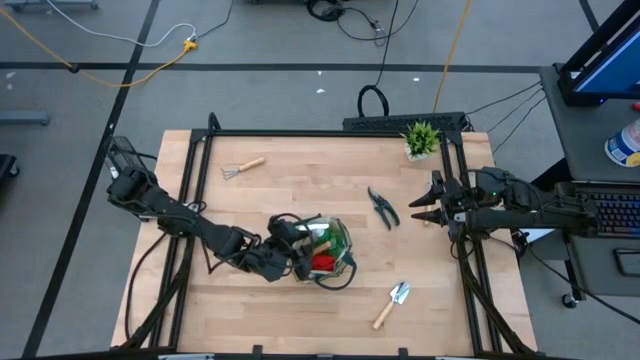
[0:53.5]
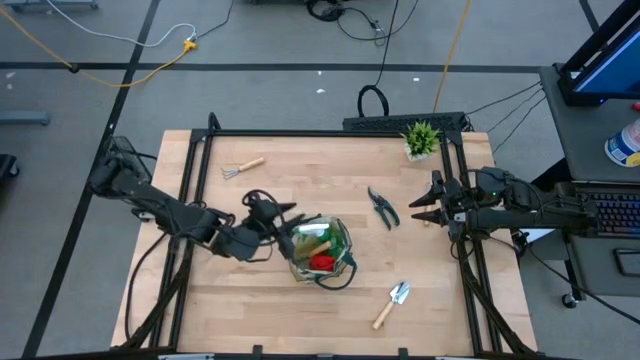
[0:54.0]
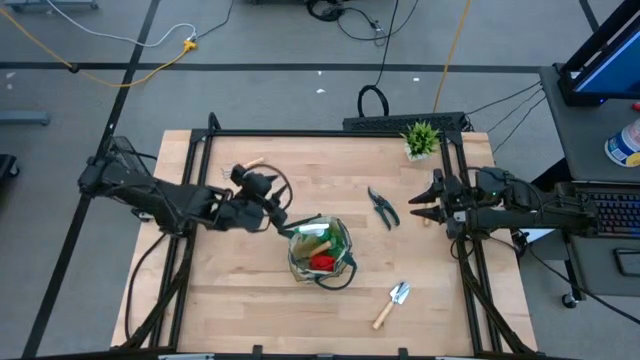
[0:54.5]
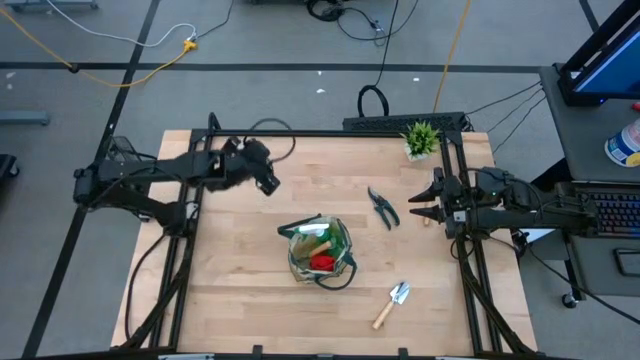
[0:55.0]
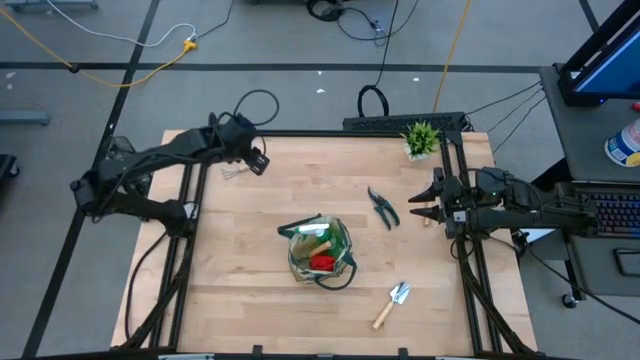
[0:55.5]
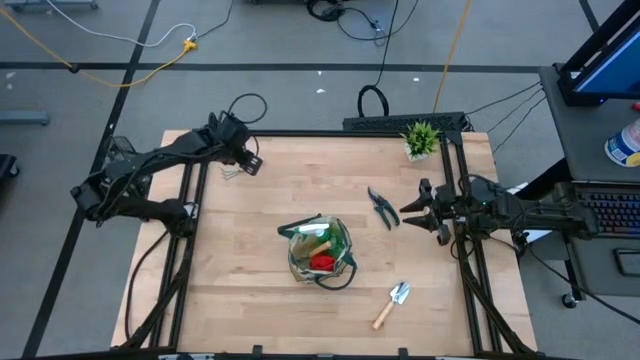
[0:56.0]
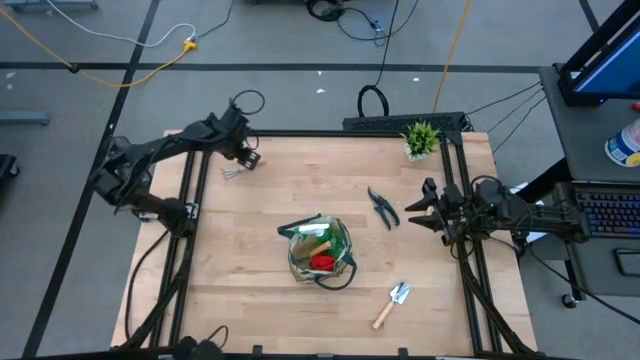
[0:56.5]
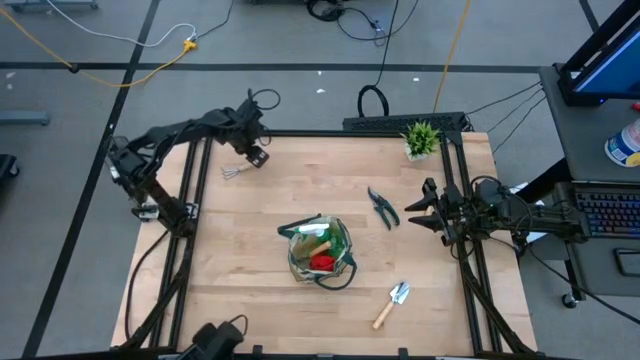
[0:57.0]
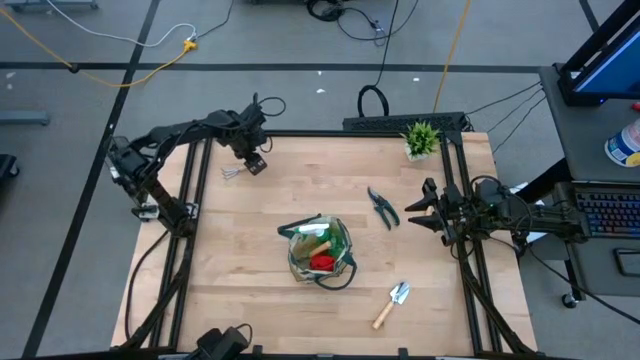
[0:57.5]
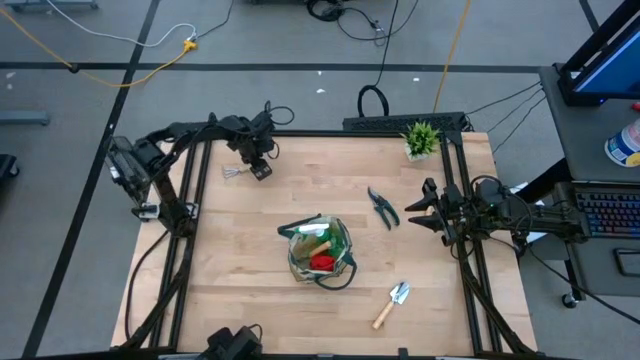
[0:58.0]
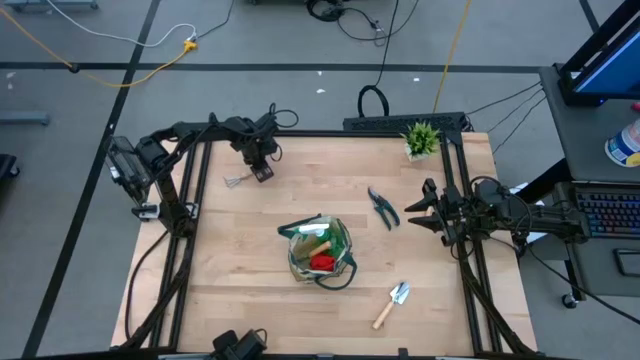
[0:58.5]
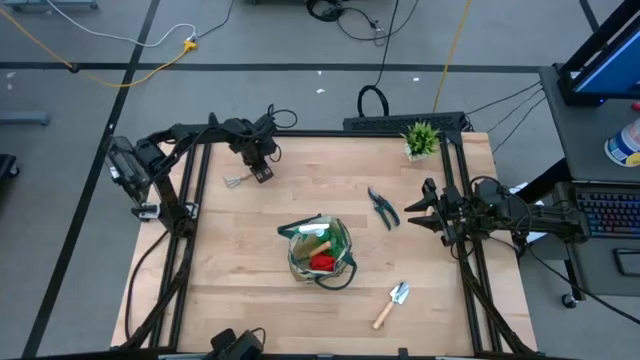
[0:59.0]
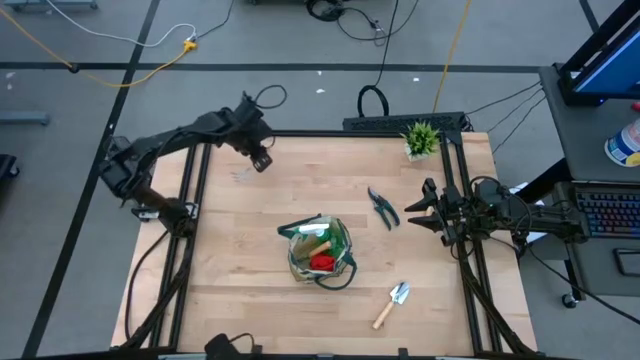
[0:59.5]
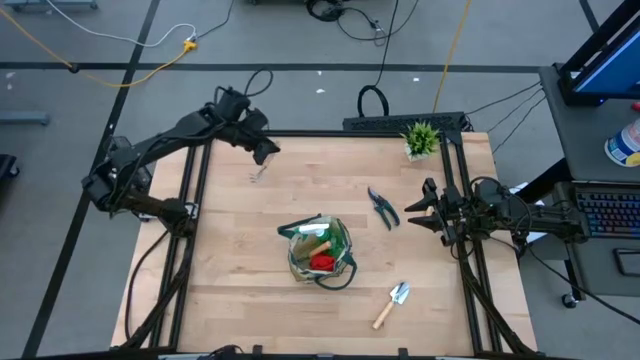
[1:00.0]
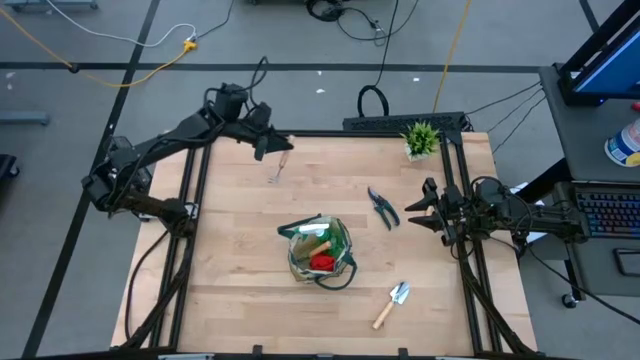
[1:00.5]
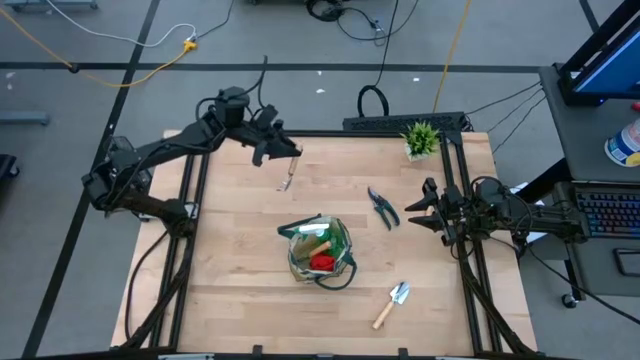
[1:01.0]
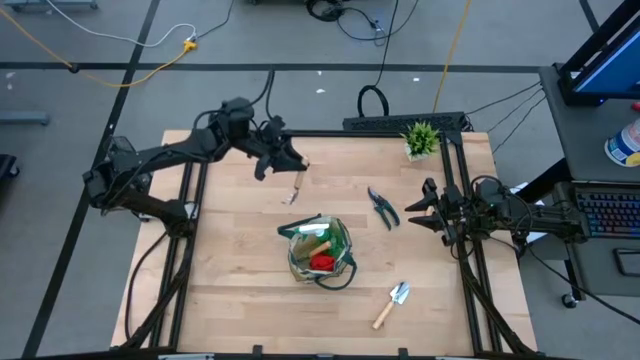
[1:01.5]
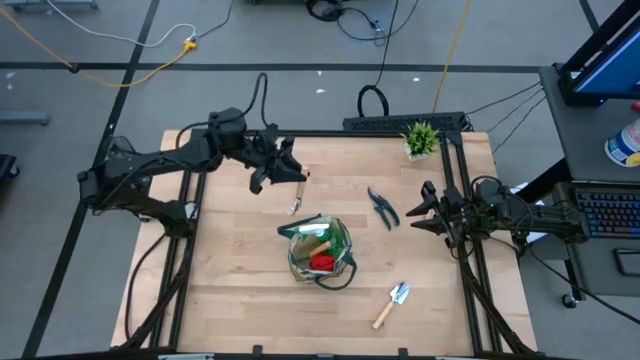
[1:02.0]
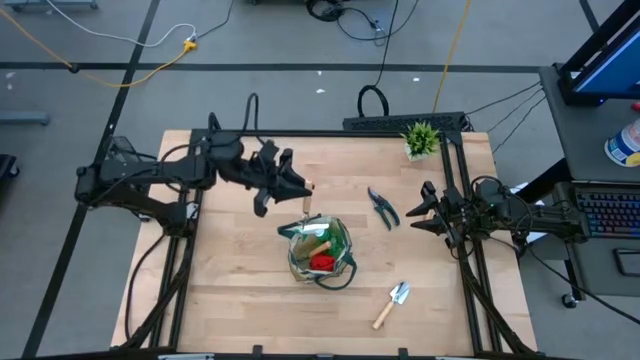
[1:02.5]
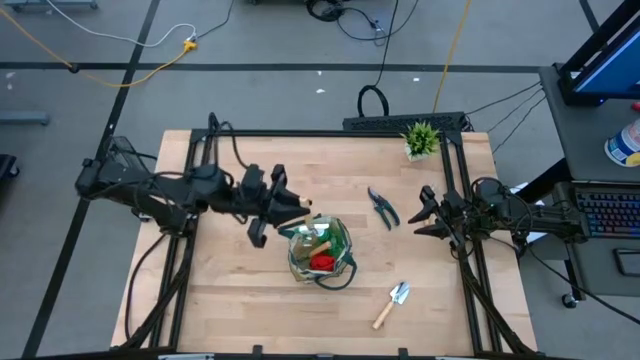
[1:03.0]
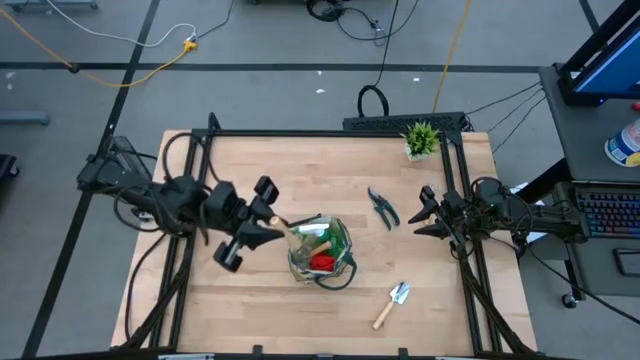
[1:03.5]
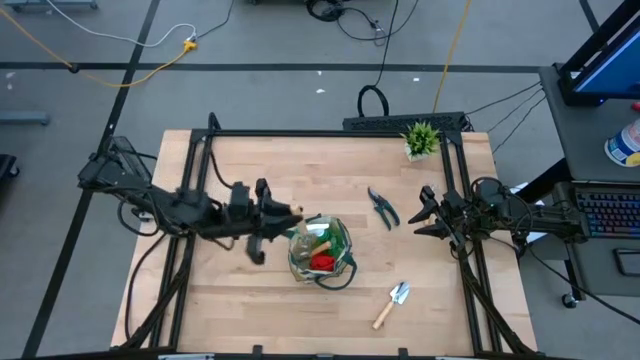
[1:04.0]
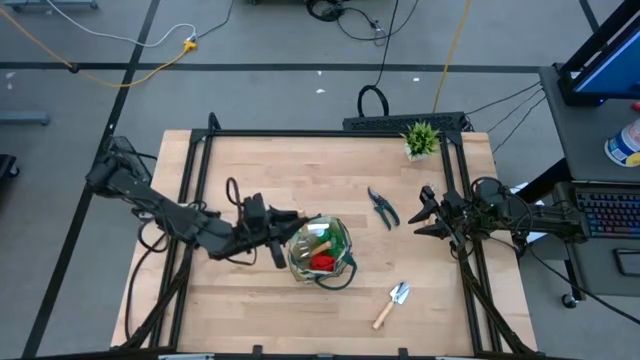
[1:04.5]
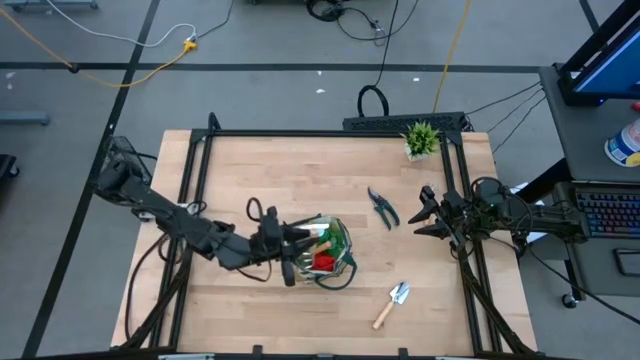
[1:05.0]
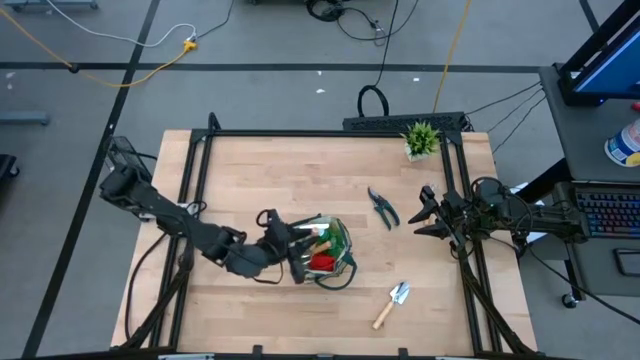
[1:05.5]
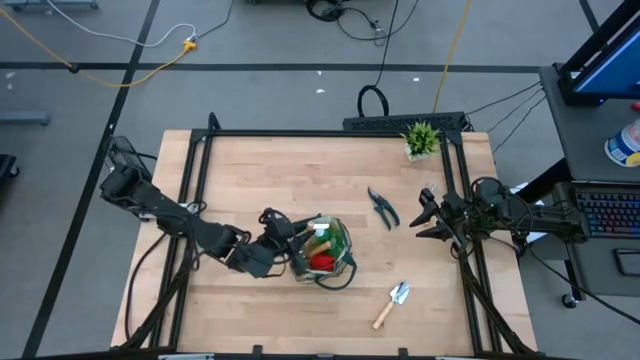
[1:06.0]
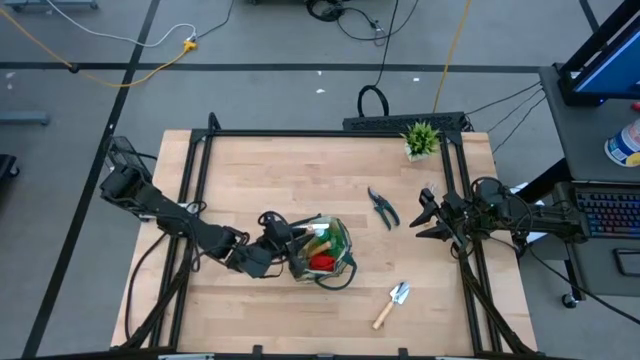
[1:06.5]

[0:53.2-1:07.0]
Task: Pick & Place Garden tools in Gardening bag
Put the left brown hand rake into the gardening bag

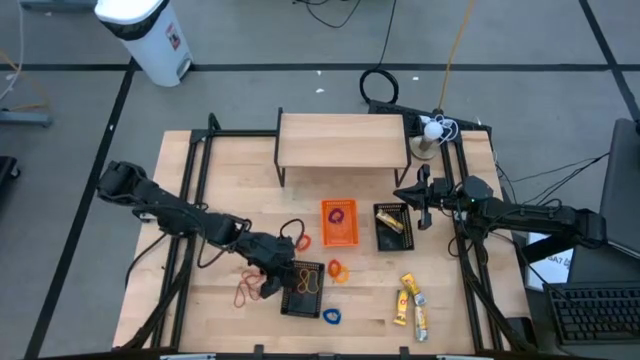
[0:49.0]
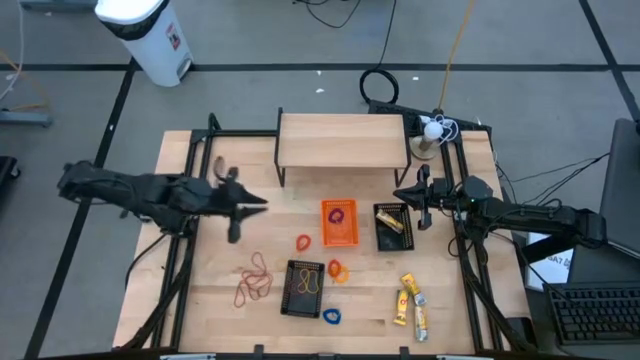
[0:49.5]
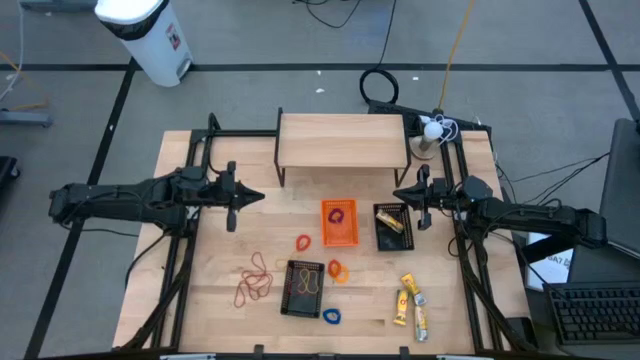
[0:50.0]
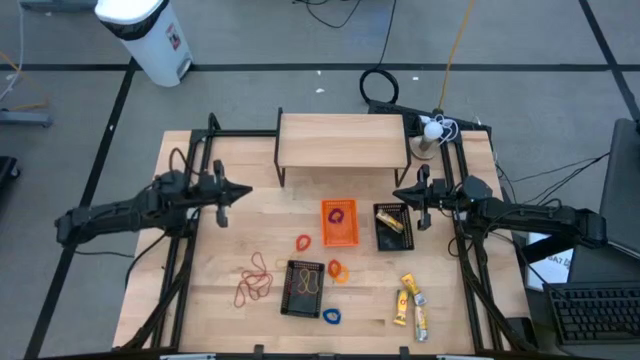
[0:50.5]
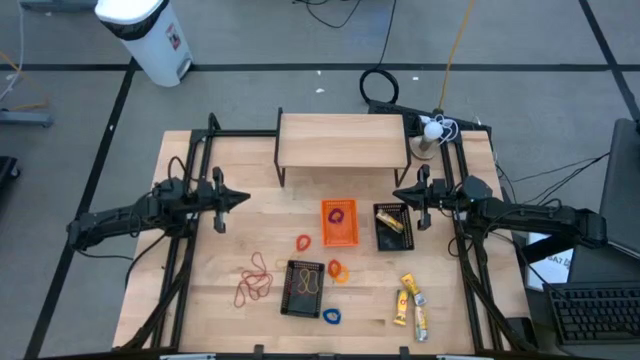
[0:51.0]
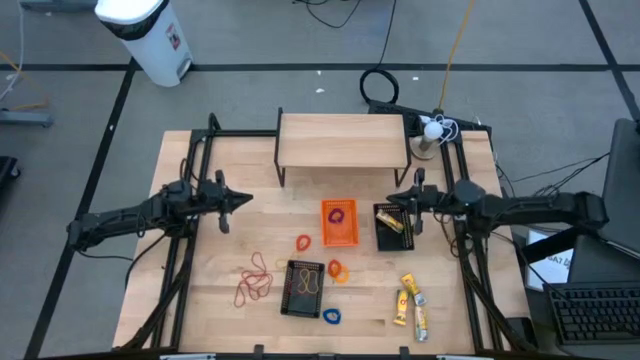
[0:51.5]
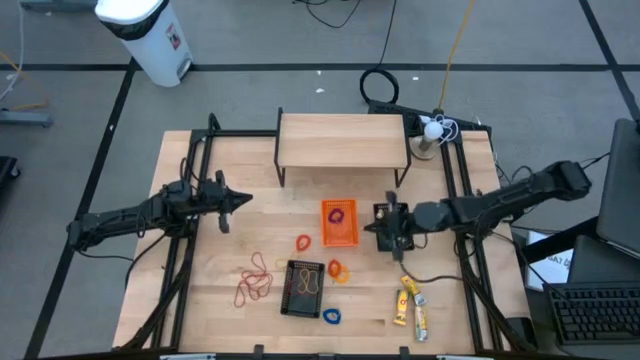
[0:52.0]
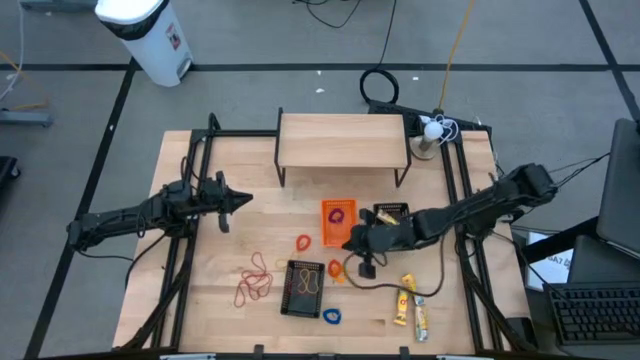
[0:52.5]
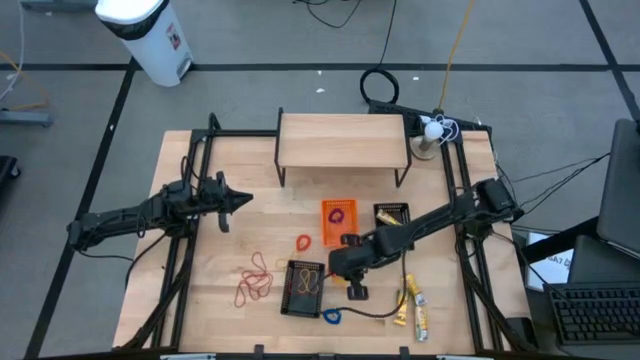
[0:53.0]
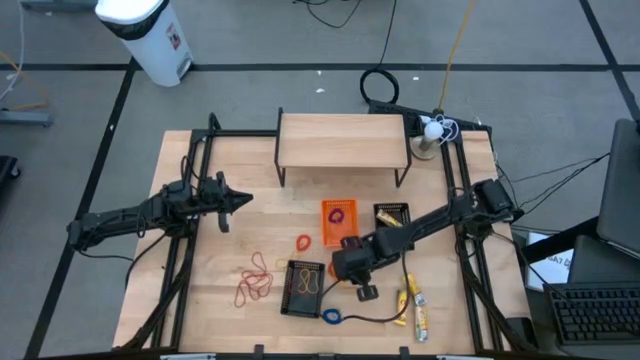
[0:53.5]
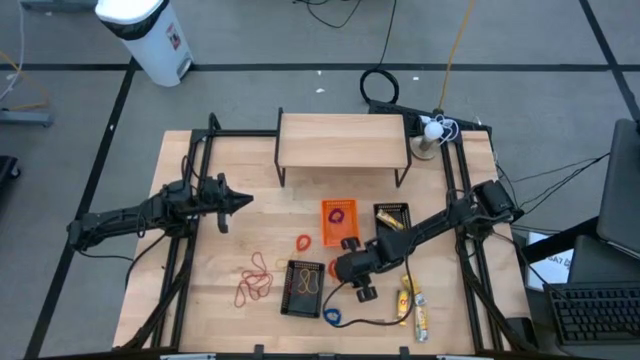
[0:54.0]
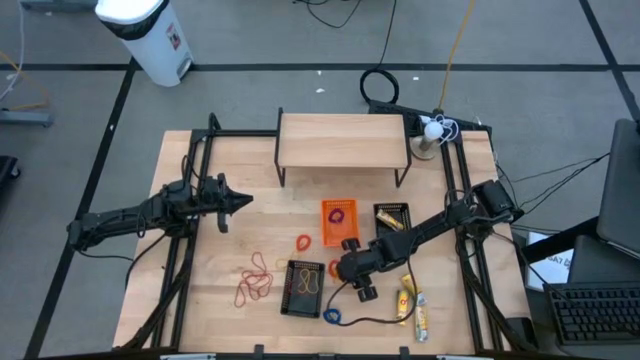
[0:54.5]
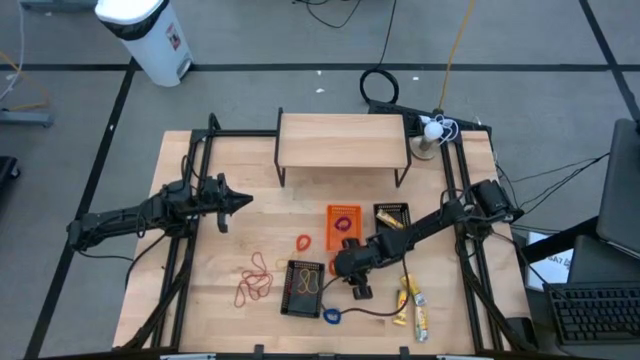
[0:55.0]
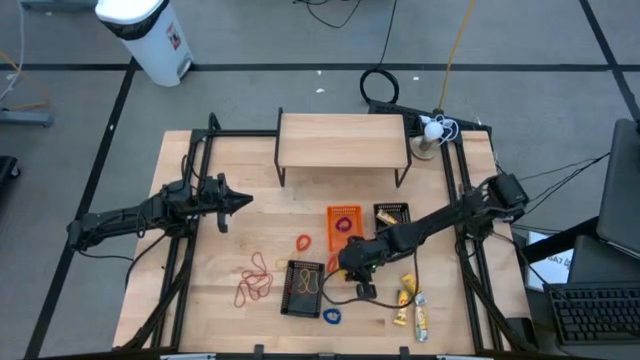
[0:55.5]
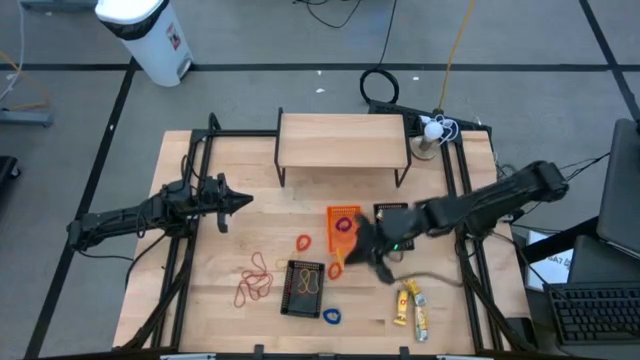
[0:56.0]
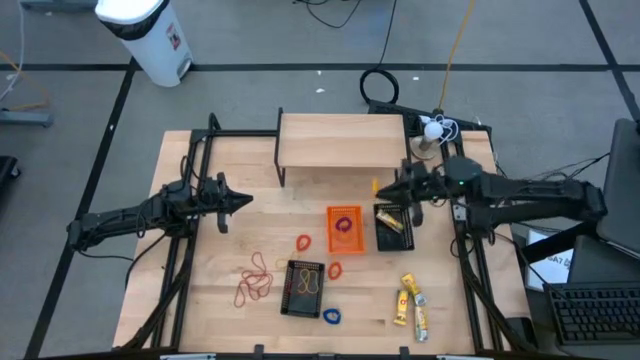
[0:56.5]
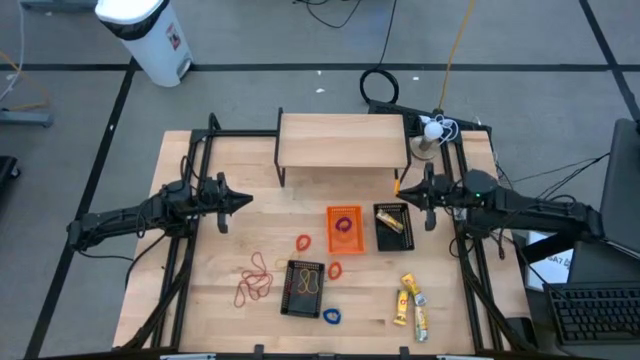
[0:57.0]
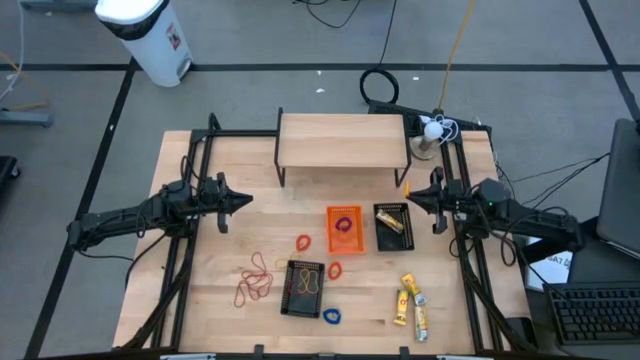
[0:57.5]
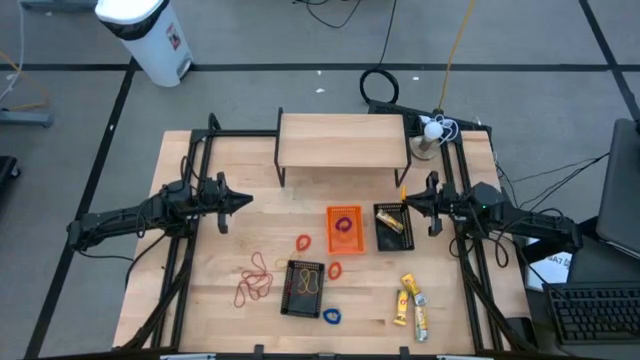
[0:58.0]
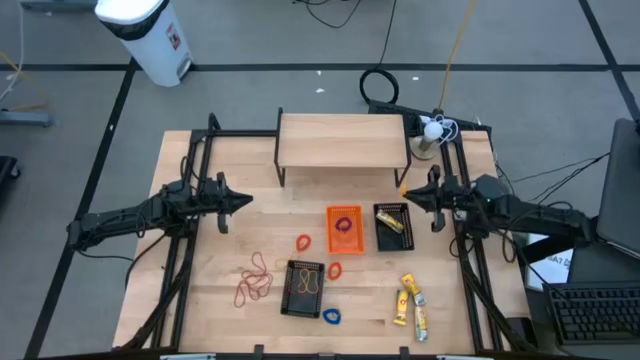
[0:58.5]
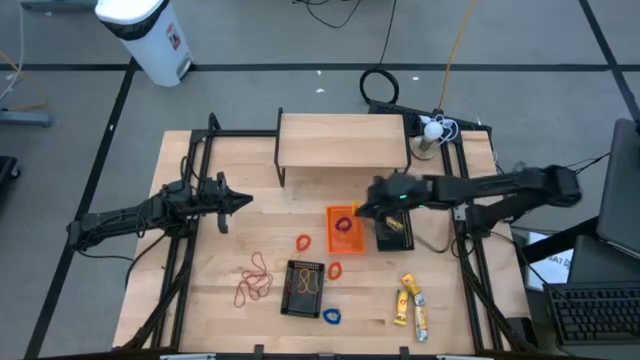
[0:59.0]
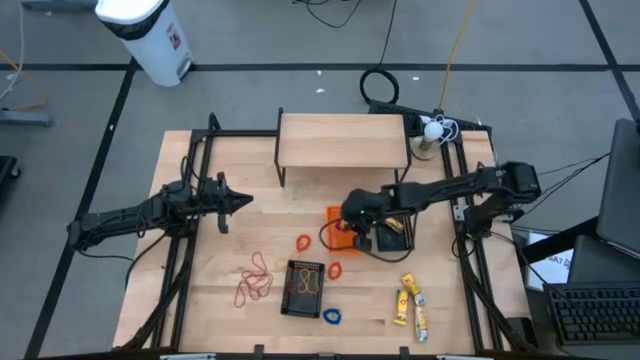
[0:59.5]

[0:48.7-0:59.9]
Task: Pick & Place Office Desk Supplies
Put the yellow spring keychain into the orange bin
